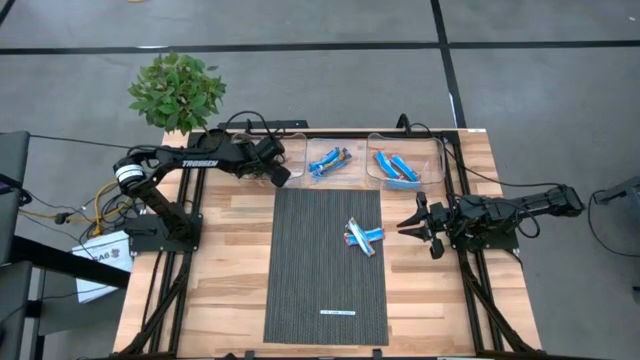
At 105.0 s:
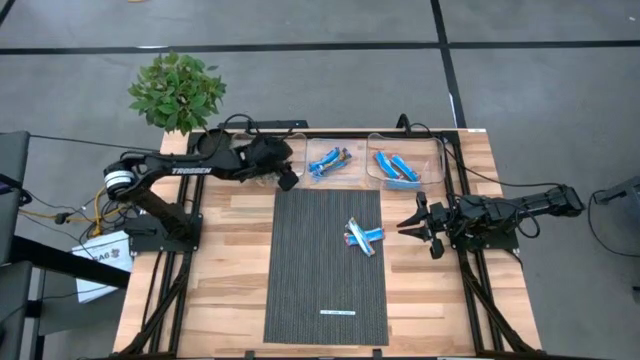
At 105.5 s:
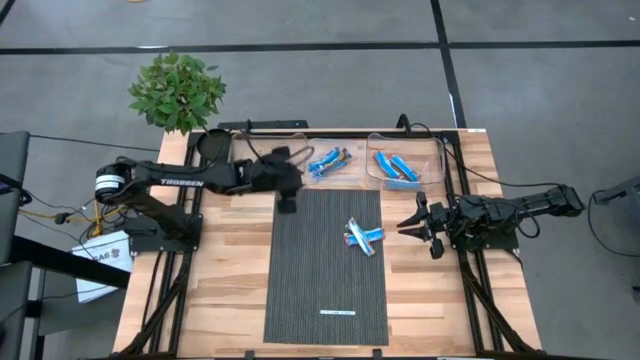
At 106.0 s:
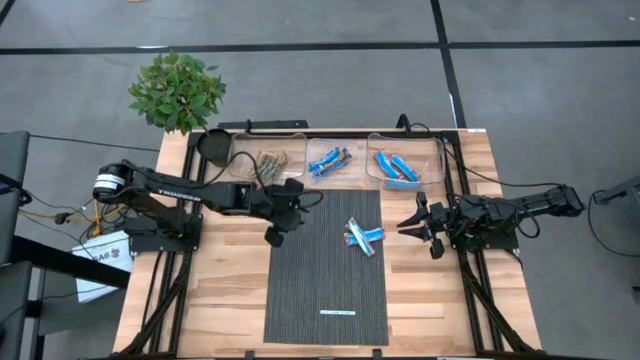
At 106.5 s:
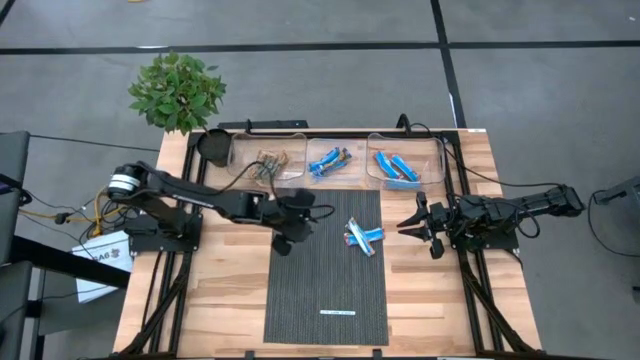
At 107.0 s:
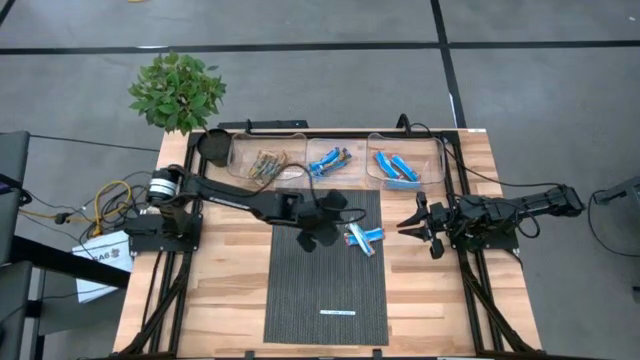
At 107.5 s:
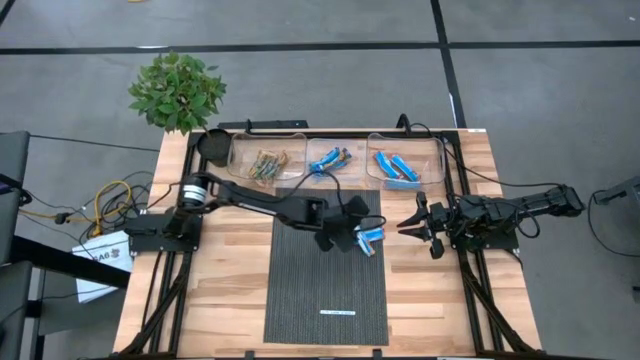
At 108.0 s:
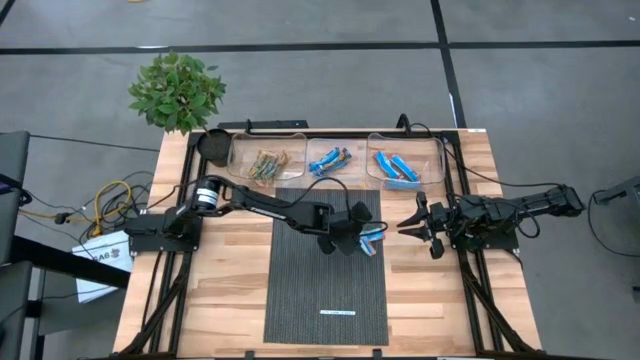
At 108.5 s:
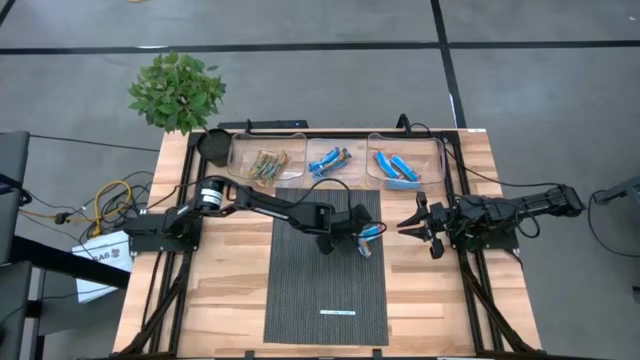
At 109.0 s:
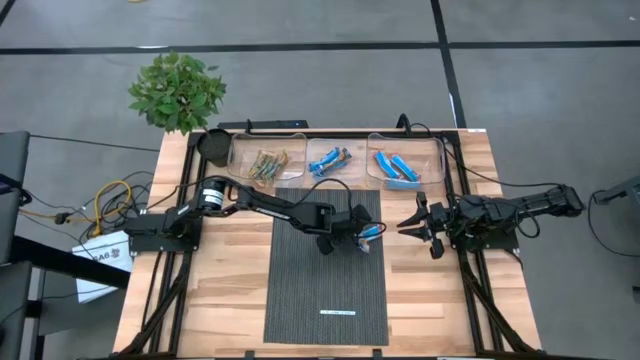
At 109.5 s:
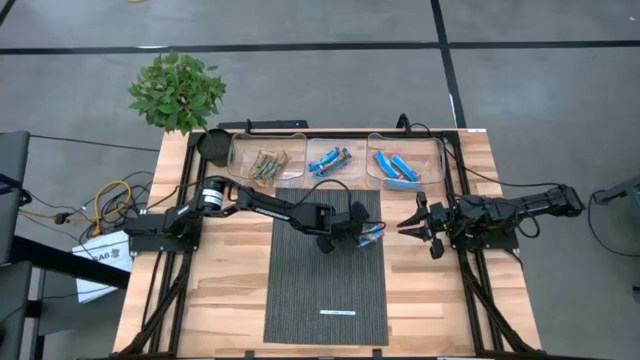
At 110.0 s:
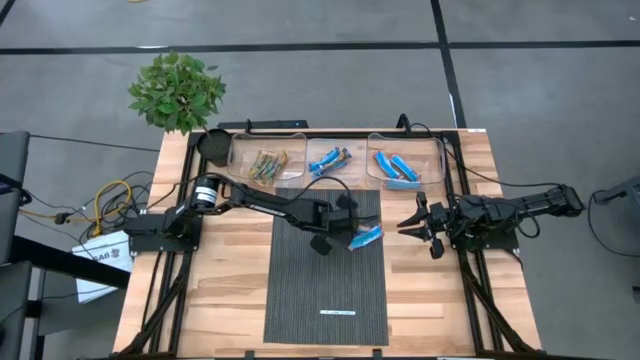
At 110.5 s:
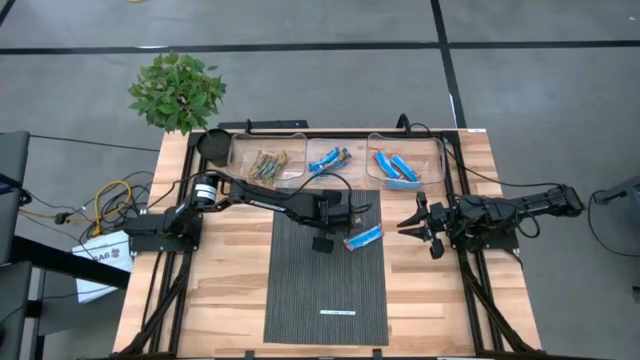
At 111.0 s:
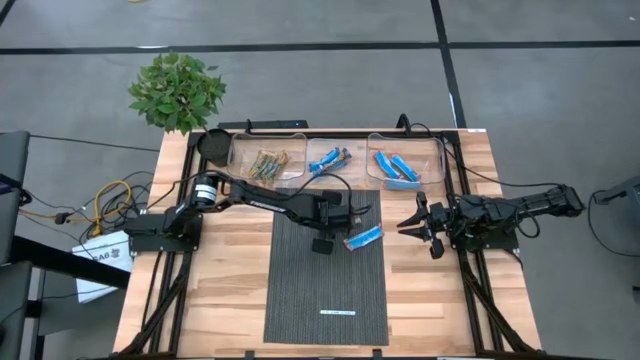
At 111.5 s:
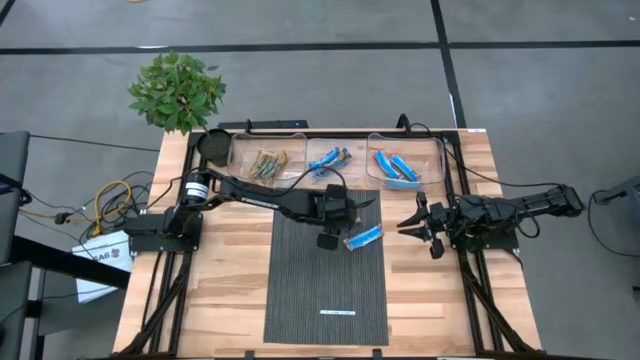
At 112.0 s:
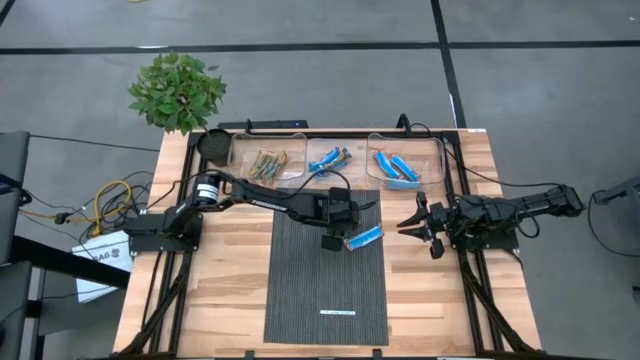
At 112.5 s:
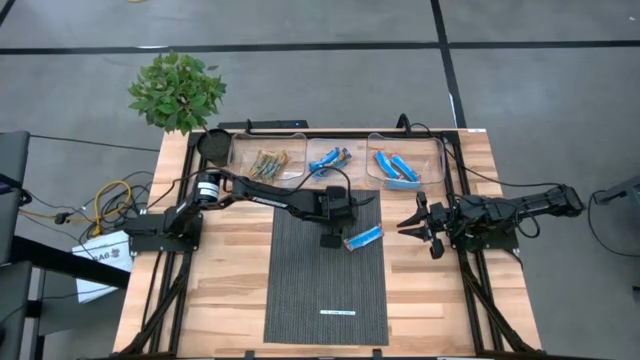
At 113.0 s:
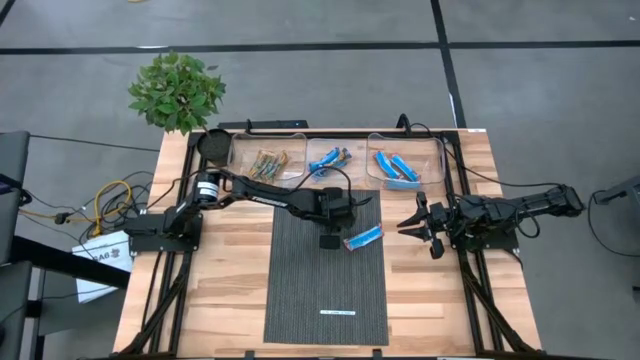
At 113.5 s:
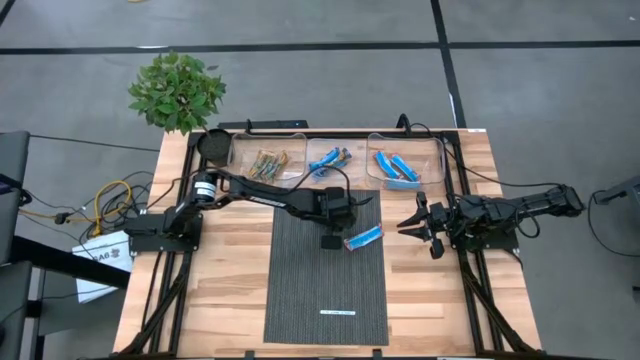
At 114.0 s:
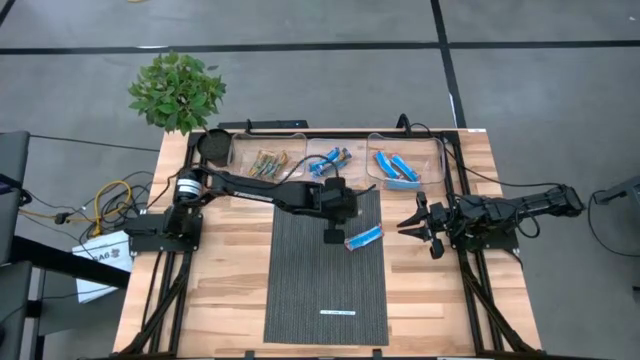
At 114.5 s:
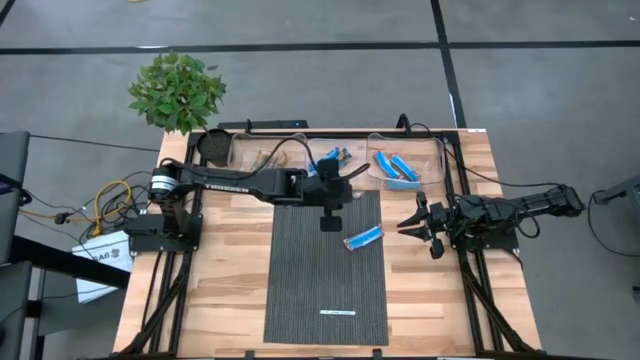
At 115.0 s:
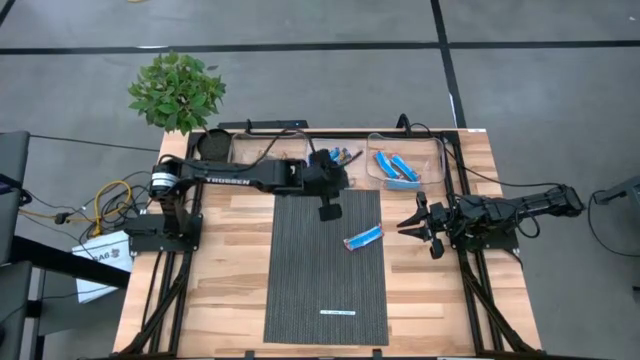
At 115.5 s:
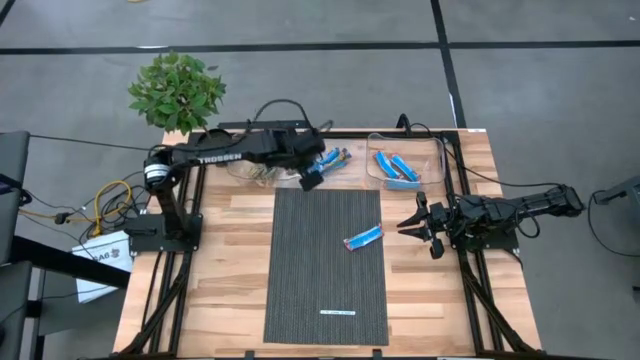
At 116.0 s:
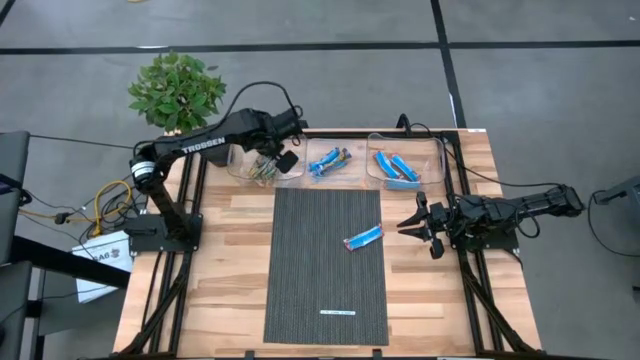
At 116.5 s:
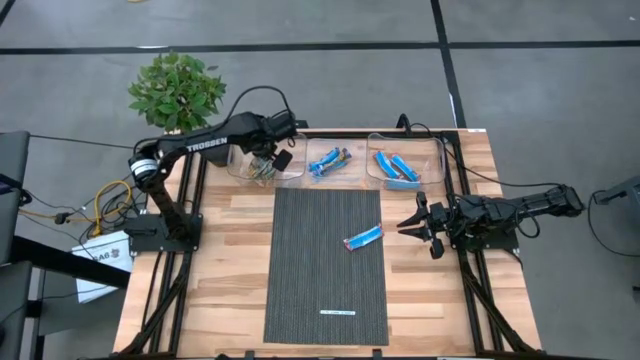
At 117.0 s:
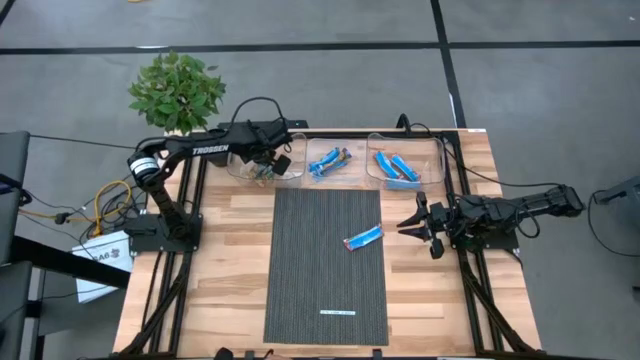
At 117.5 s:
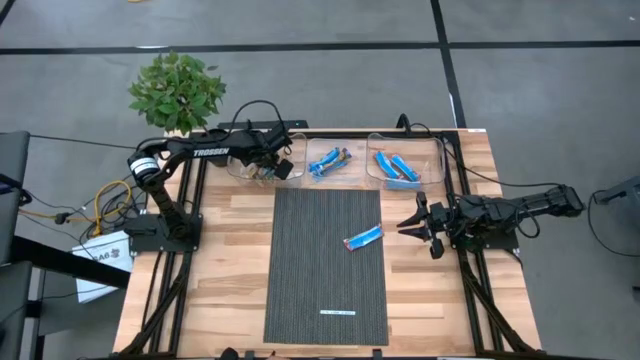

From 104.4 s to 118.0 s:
Task: Pick and place Granola Bars by type
Put the yellow granola bar into the left transparent bin

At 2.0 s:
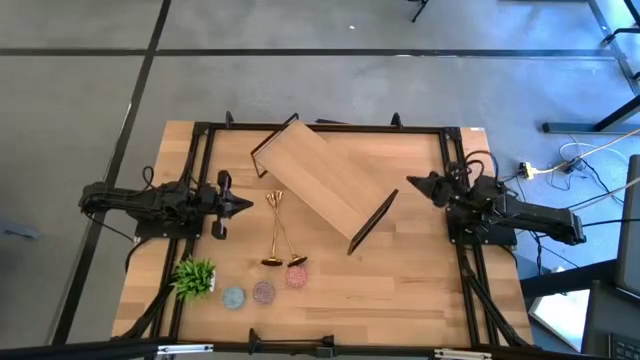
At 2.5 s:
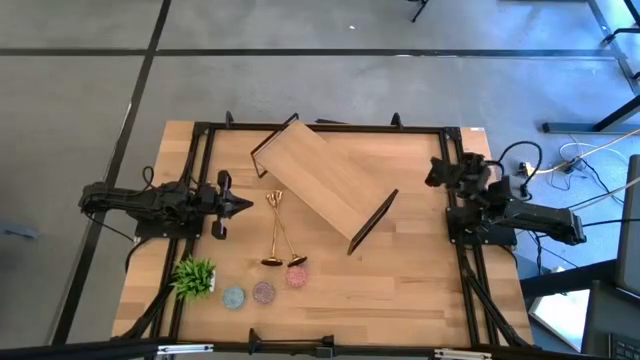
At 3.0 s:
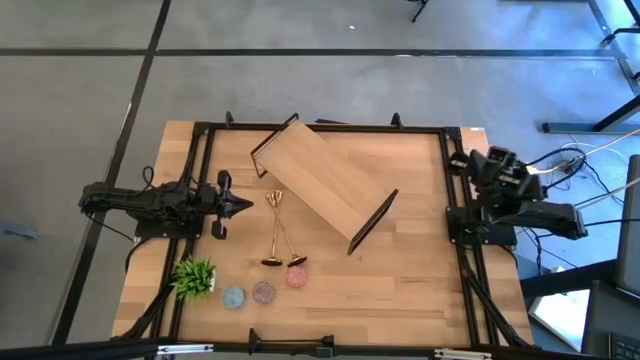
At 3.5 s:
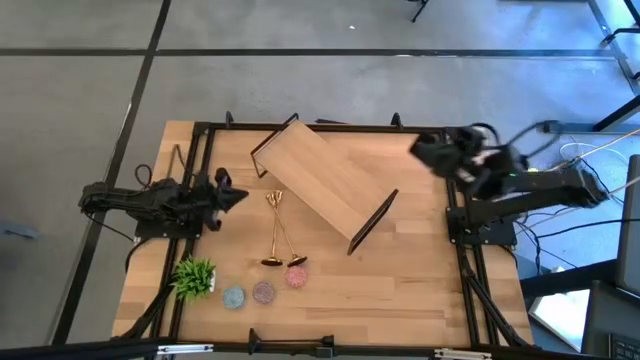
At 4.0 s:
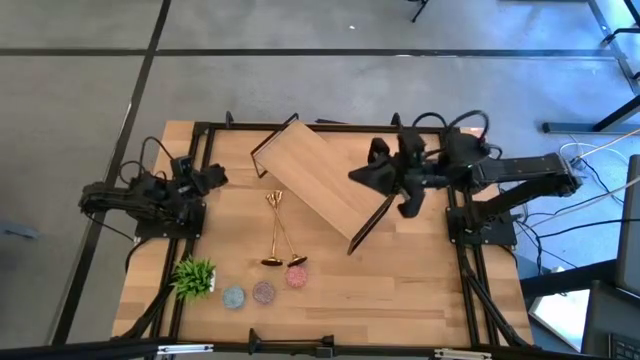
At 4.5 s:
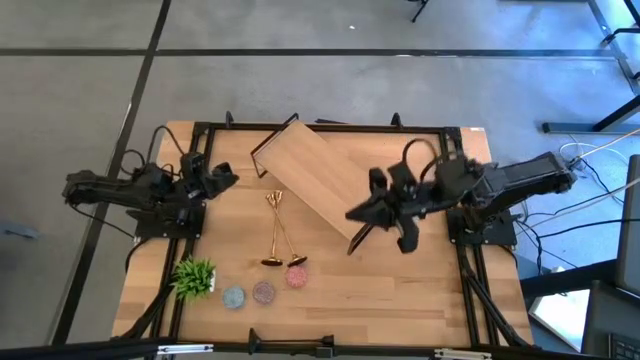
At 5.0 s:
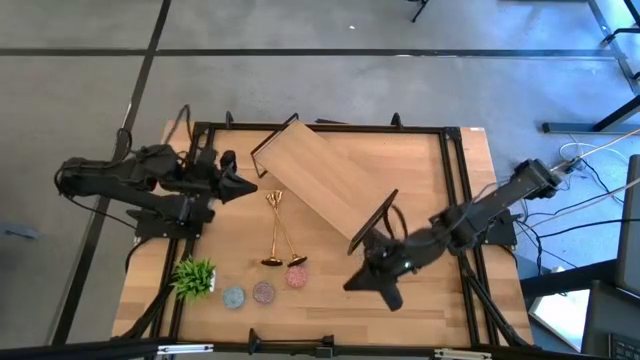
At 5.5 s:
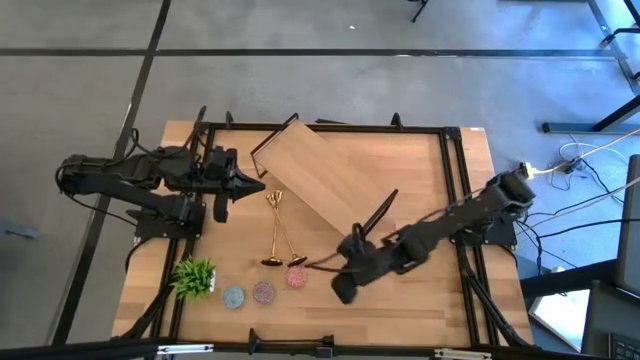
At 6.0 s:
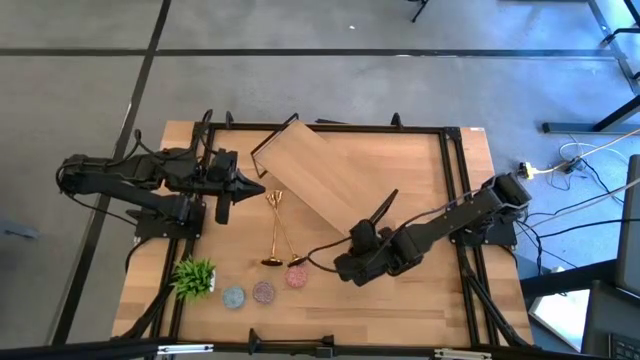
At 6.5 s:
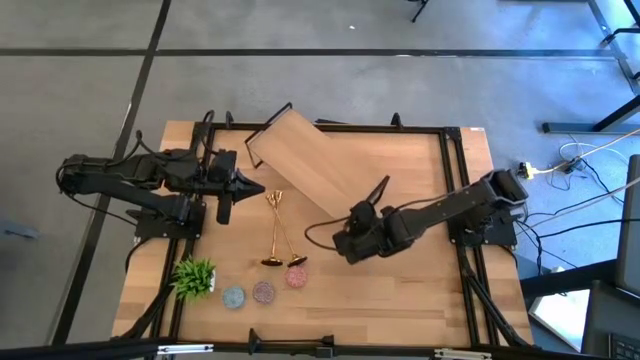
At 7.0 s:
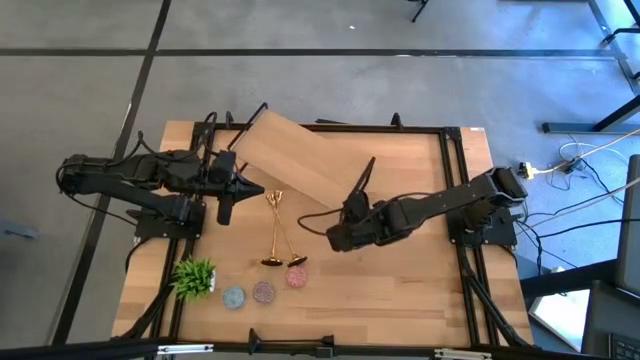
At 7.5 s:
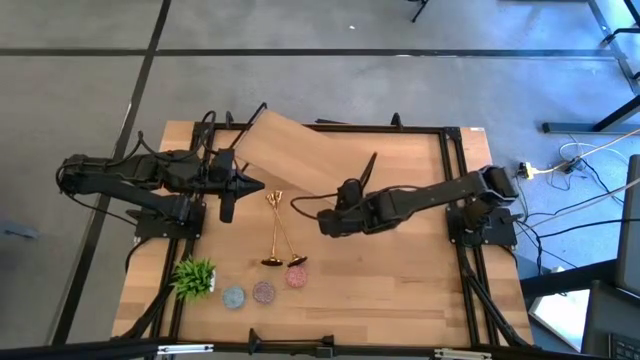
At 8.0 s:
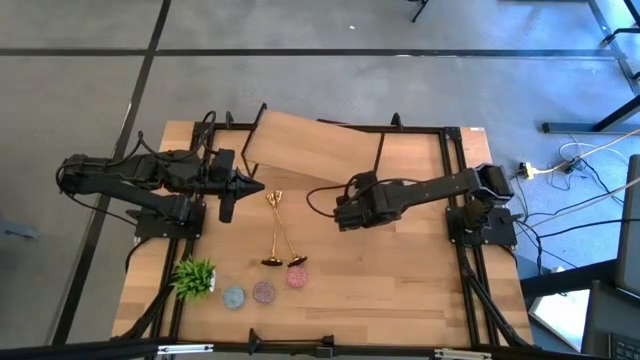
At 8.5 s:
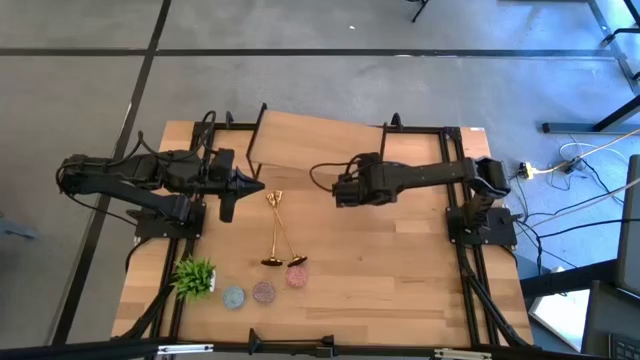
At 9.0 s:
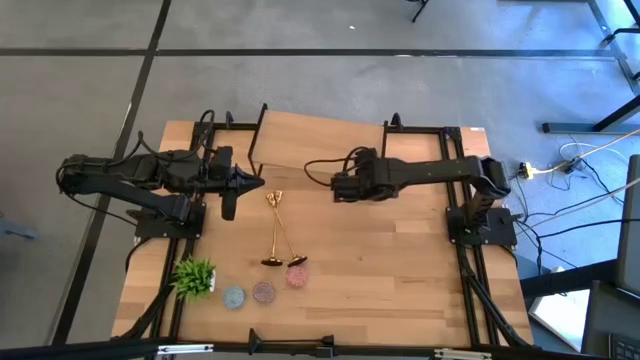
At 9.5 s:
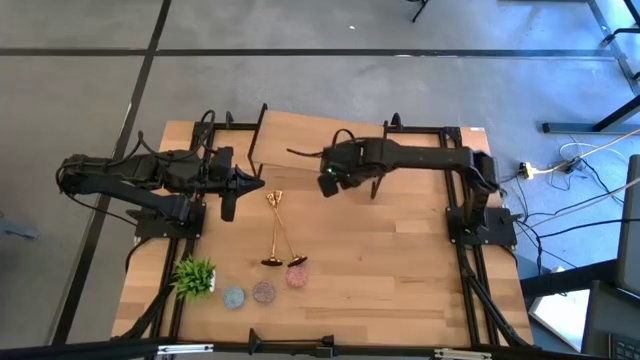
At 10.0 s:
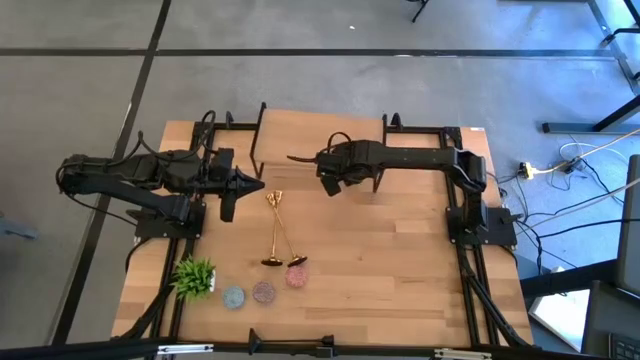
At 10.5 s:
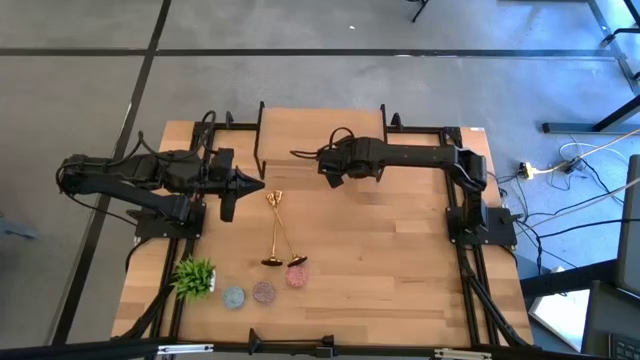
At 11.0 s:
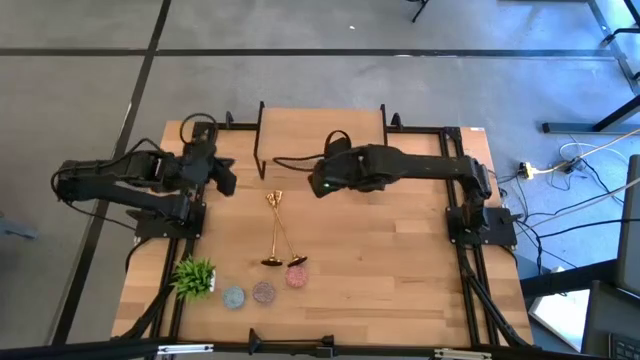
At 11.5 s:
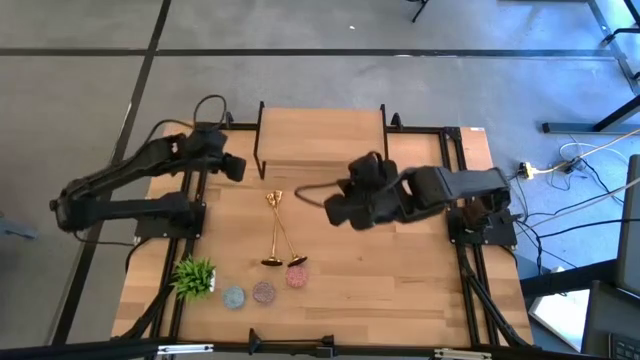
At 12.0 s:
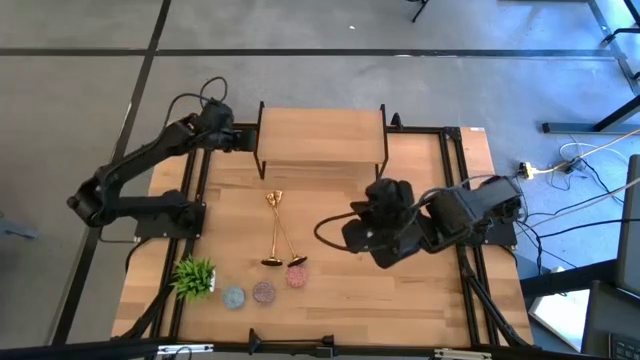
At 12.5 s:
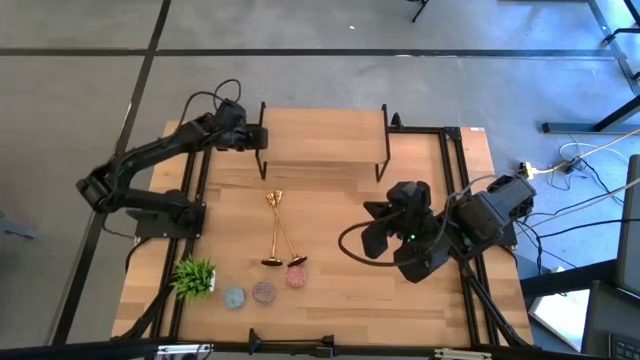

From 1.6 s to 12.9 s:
Task: Pick & Place candle stick holders
Adjust the shelf
